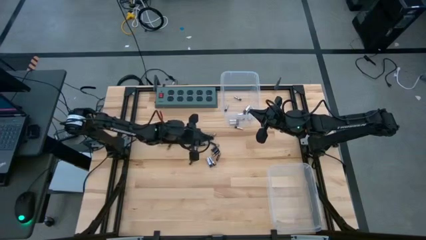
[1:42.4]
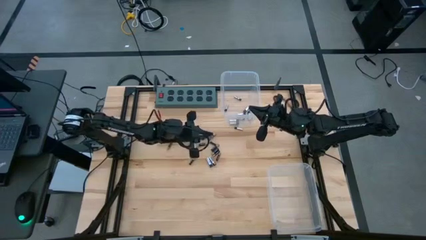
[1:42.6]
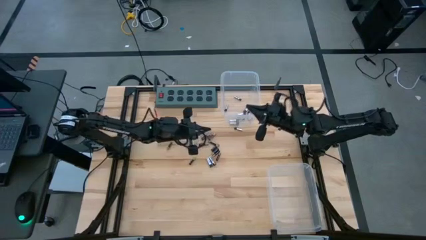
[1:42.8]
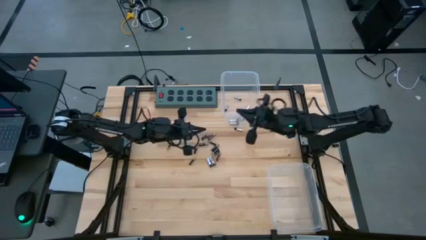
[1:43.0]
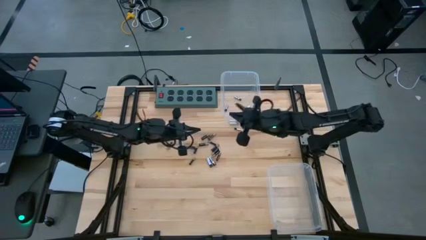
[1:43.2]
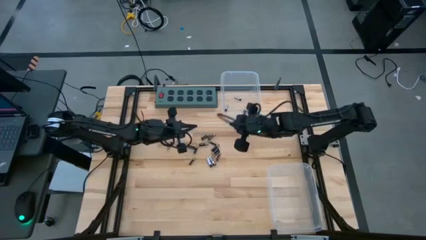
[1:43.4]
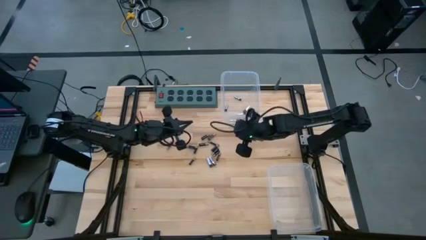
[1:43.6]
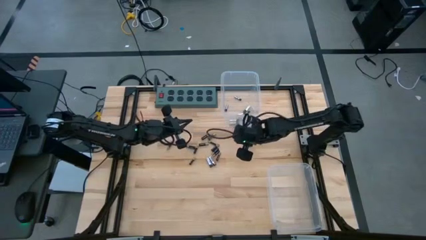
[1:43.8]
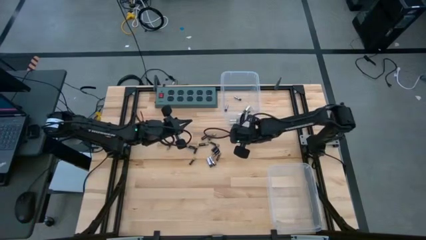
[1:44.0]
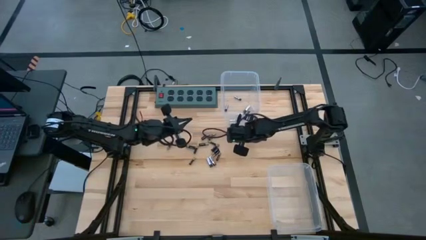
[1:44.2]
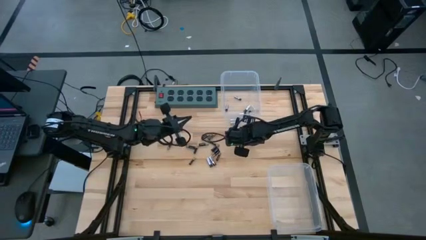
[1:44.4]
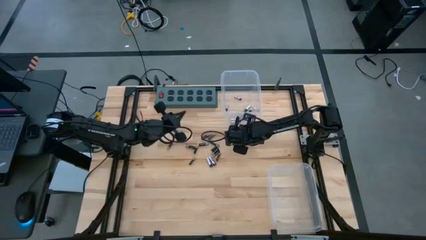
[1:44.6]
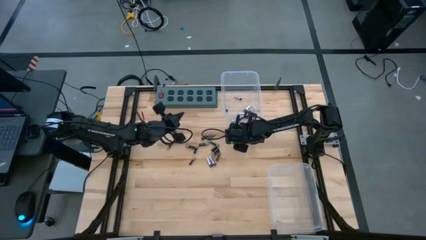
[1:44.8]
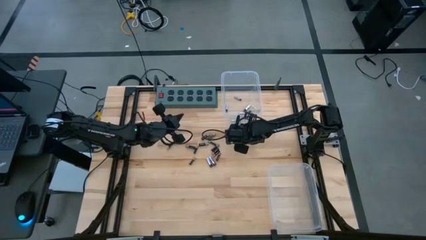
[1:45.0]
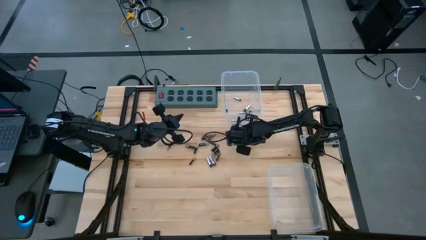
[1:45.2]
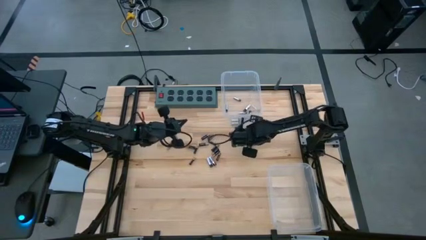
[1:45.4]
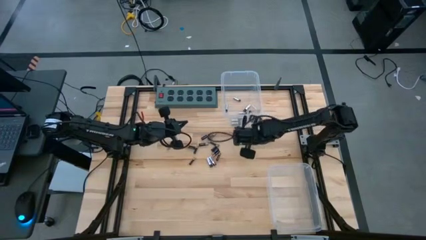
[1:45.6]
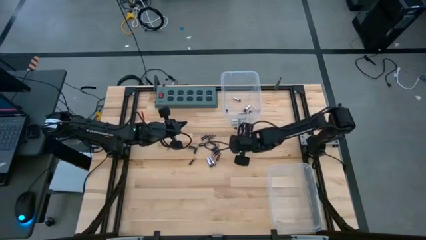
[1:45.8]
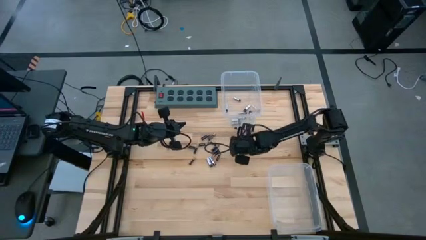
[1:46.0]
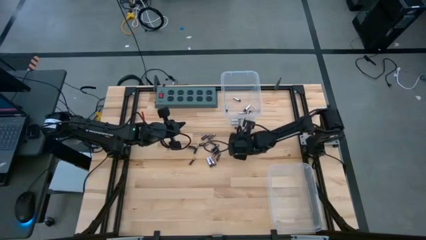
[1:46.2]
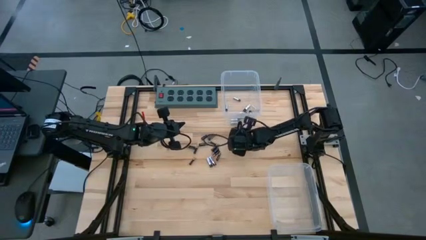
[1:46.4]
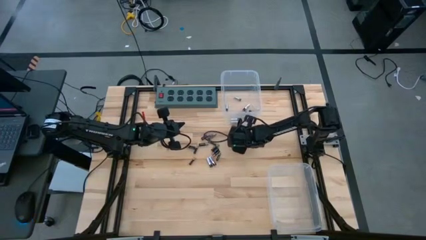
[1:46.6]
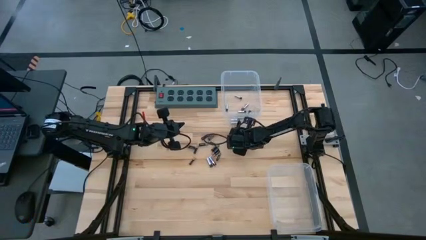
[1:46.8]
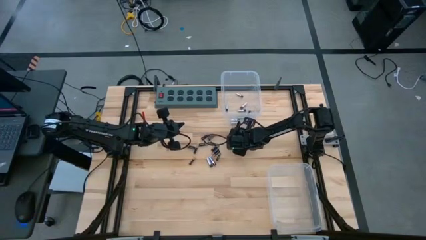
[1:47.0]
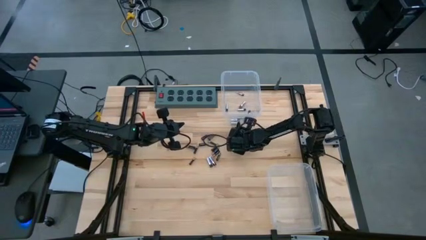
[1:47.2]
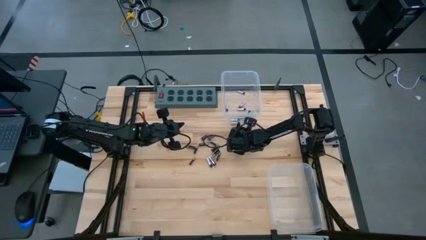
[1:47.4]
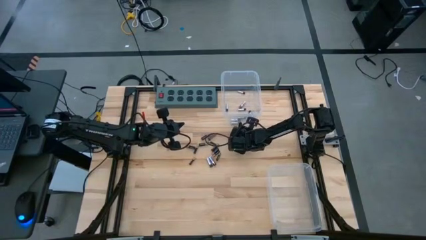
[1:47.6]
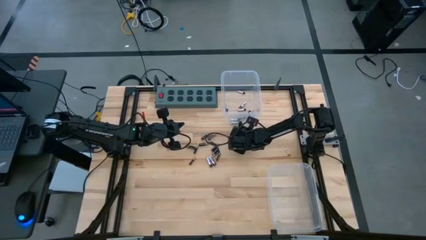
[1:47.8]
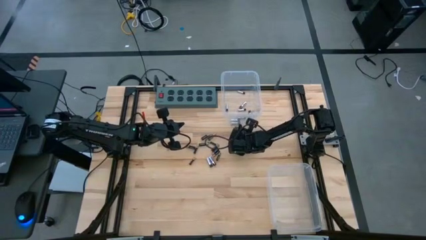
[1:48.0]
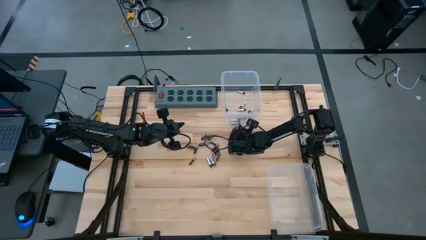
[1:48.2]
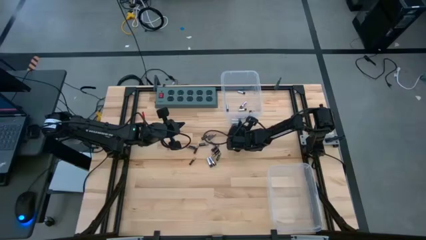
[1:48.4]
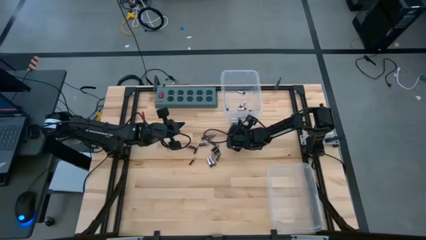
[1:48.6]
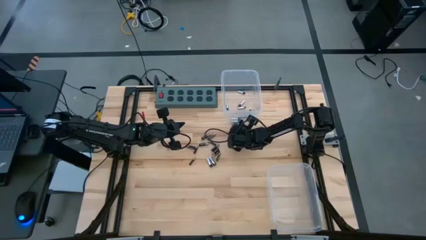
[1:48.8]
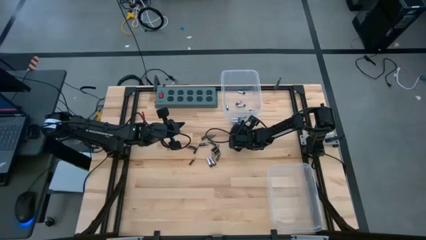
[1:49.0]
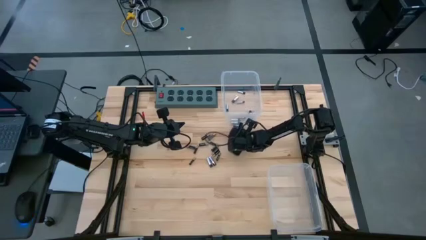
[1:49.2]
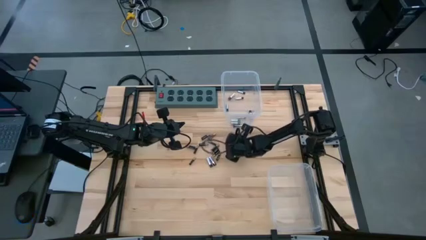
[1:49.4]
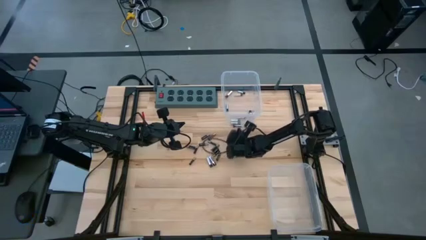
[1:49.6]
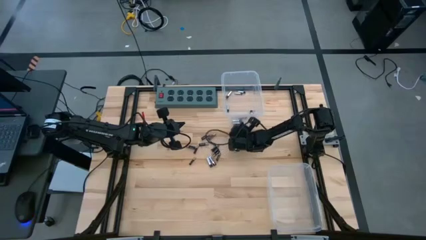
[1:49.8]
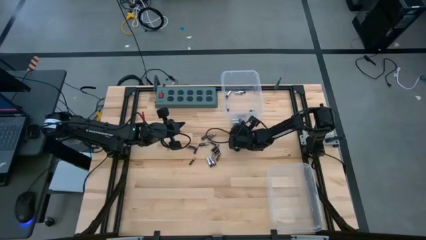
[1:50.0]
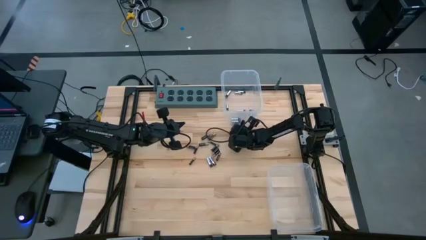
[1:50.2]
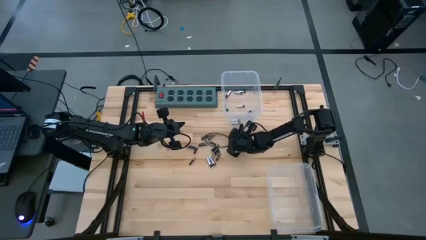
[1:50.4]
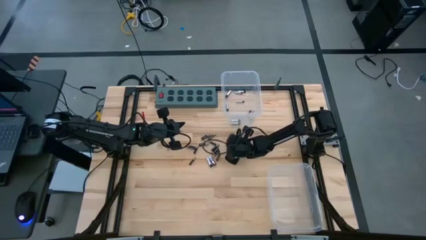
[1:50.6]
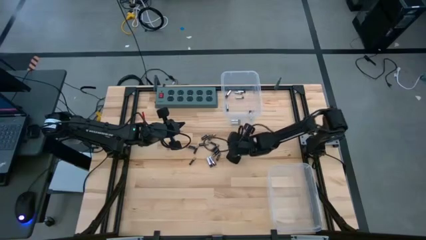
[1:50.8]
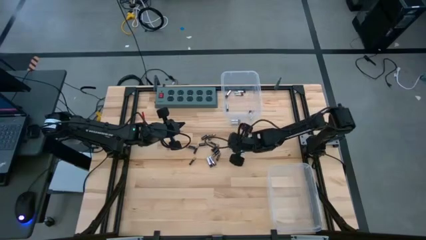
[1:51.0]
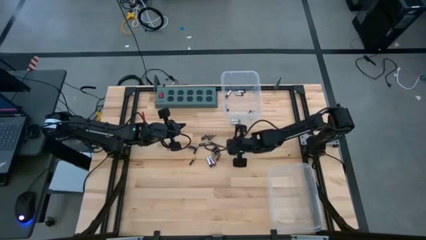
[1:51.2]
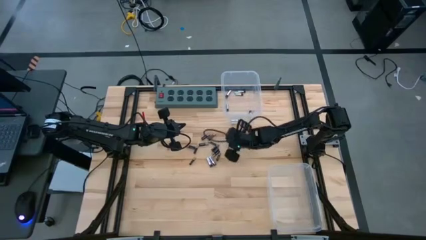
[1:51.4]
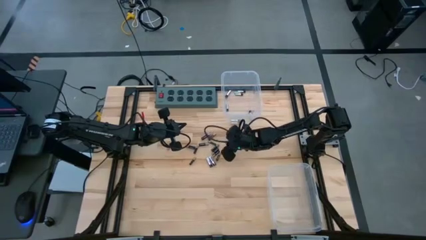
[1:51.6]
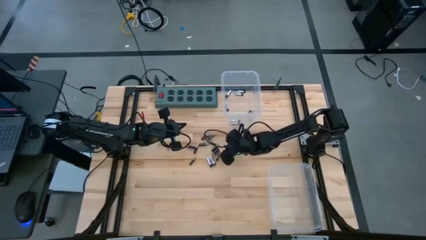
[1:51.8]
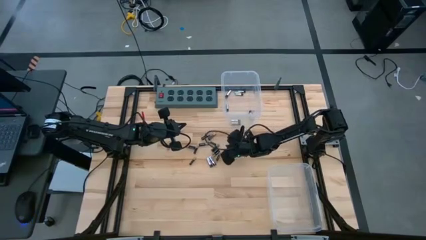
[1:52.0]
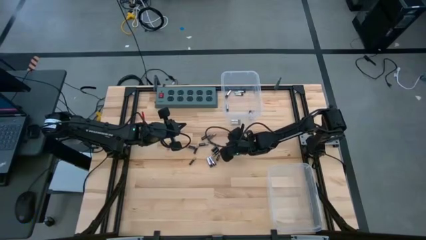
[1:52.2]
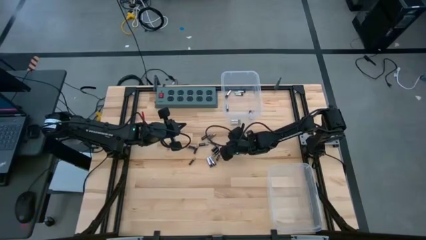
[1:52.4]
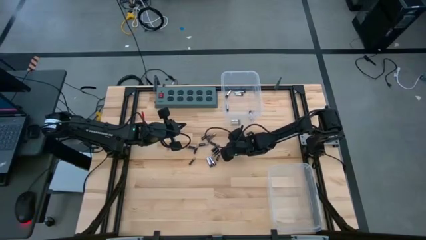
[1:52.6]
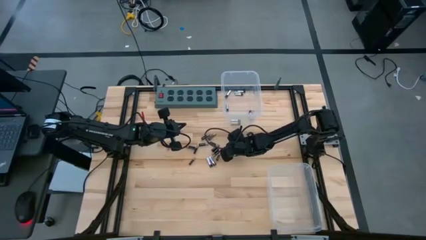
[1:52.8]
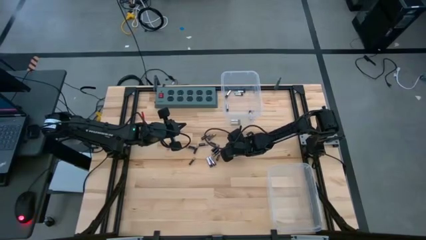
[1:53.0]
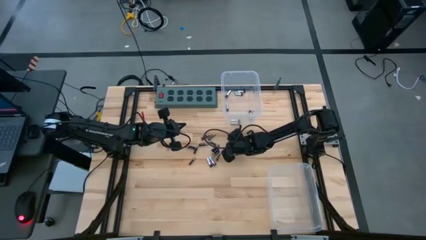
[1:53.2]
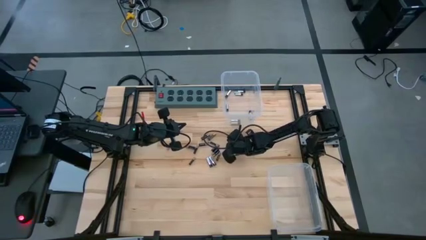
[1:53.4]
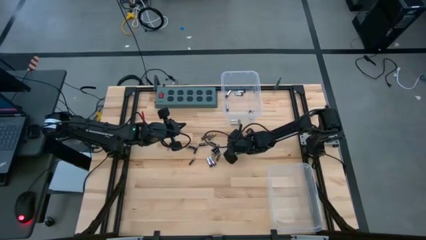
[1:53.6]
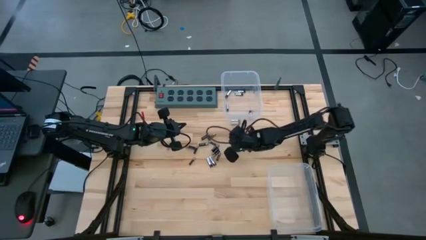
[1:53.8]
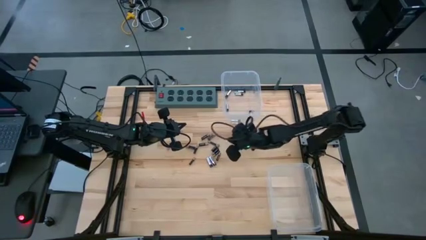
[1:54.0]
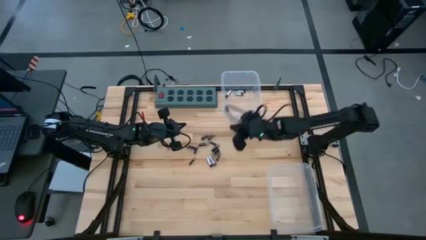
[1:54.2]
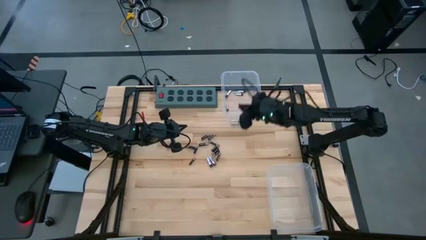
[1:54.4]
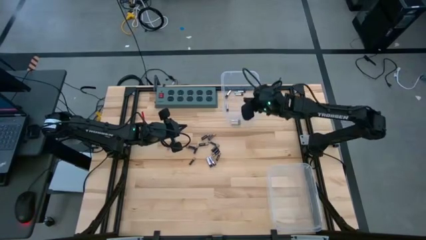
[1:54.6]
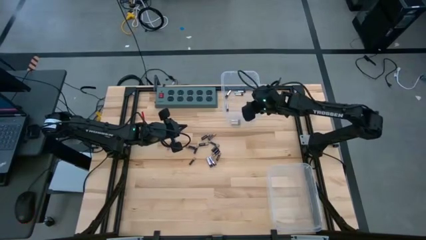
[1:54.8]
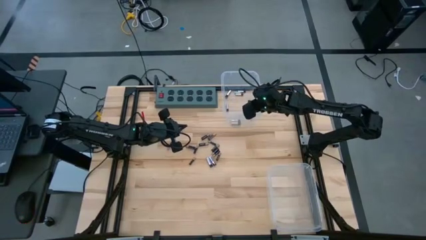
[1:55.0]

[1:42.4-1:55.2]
Task: Sort batteries
Put the silver battery into the top transparent bin

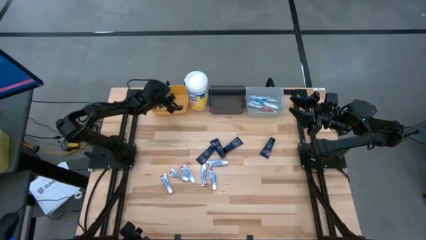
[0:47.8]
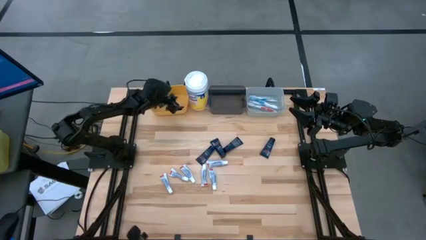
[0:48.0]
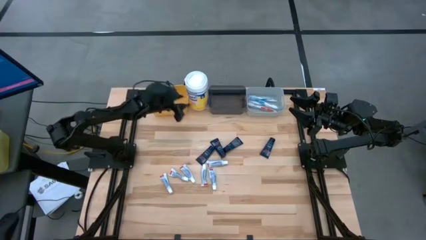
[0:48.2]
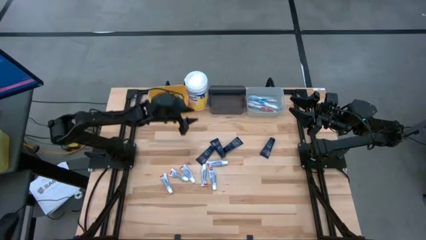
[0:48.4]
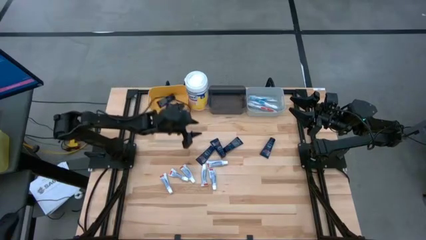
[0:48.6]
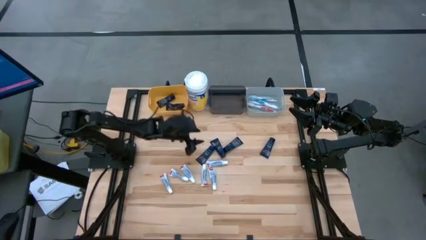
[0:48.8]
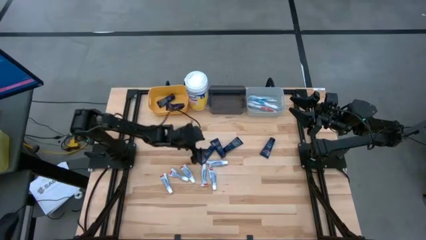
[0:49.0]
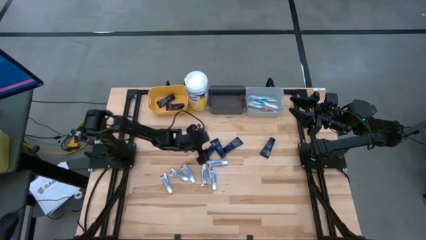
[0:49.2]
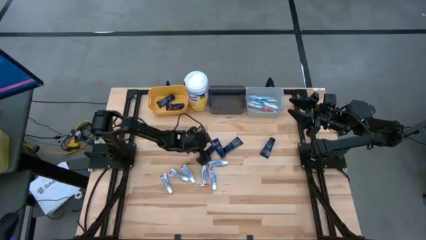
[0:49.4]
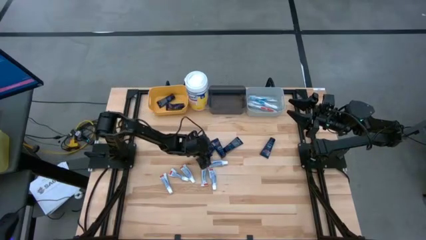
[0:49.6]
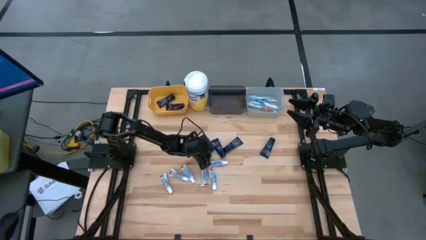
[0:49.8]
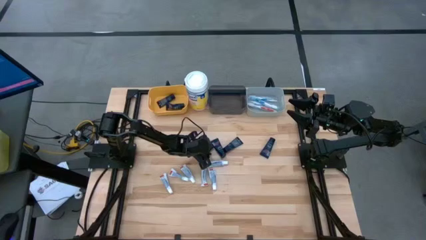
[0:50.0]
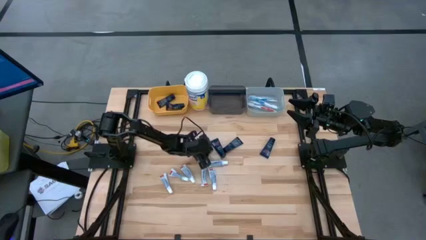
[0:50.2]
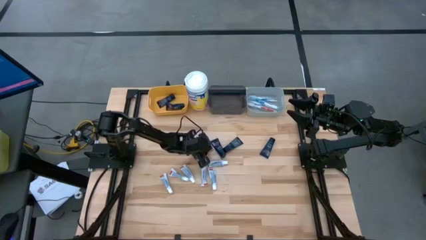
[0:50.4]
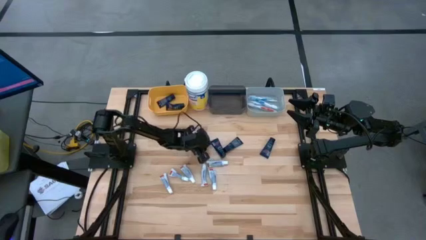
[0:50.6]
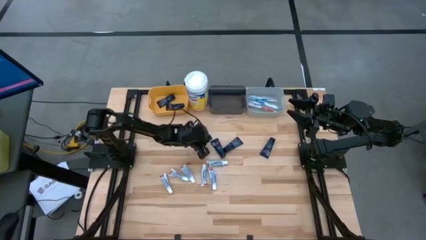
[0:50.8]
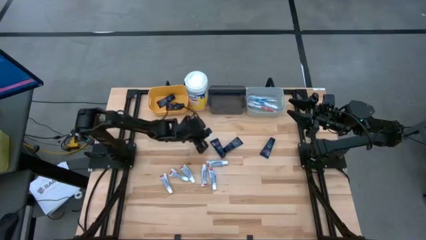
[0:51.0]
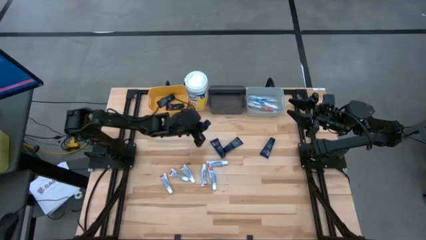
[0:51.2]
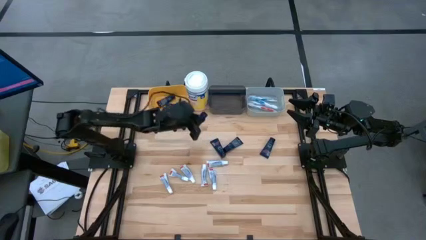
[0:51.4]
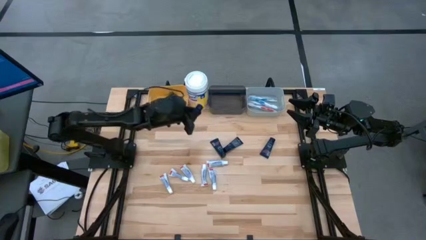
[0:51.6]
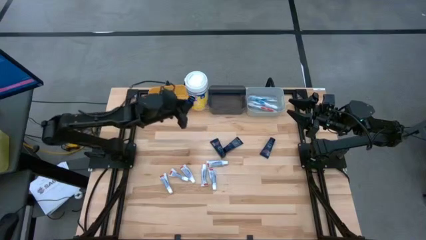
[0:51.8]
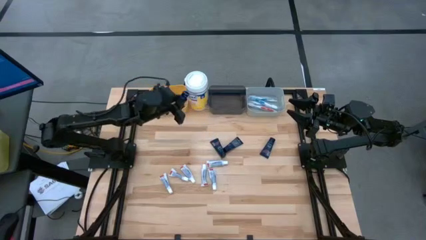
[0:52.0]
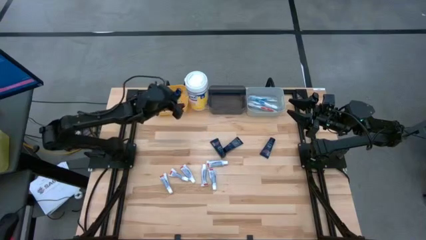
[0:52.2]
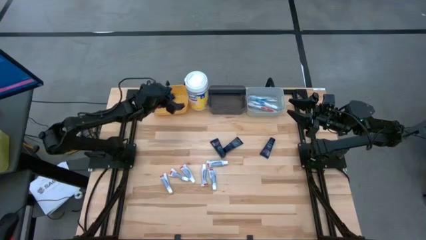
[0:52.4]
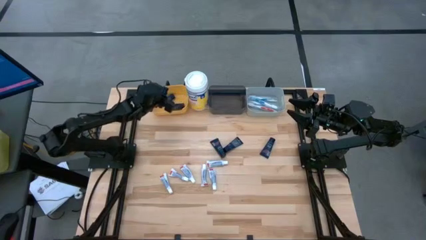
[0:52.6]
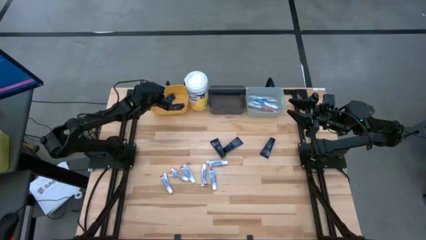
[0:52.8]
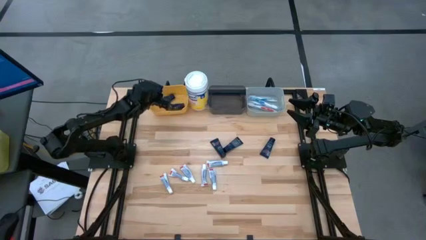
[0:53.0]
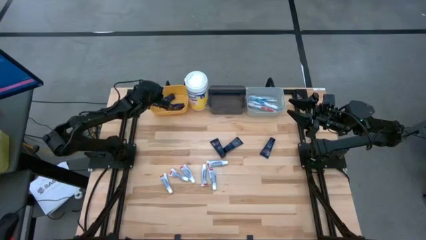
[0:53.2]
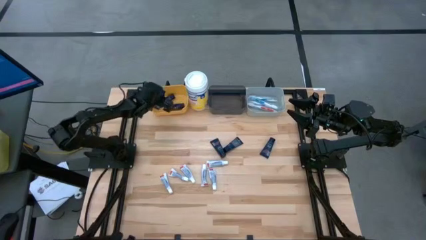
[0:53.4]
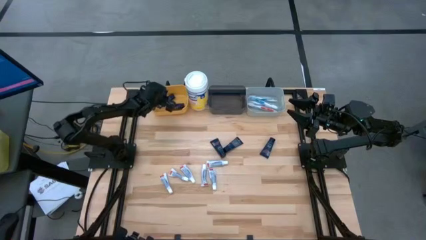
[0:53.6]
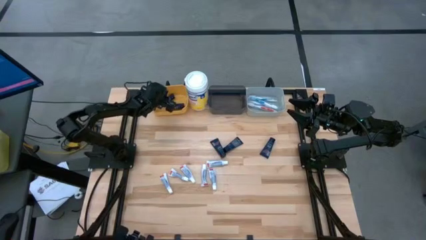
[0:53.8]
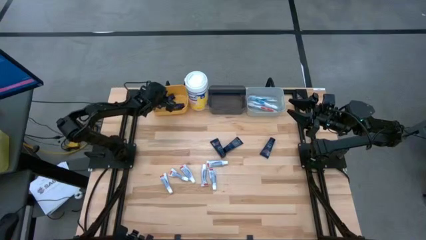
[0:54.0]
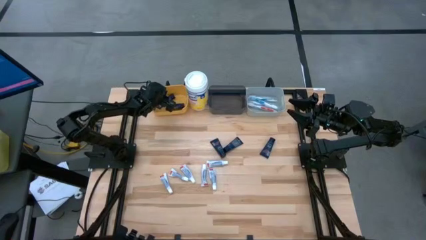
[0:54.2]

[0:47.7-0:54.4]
Task: Pick & Place Travel size toiletries
Put the blue shave cream into the yellow bin
